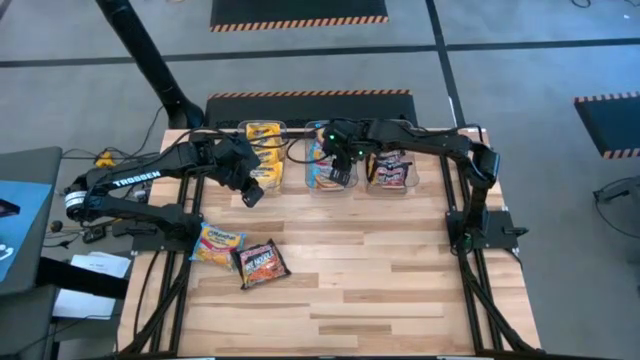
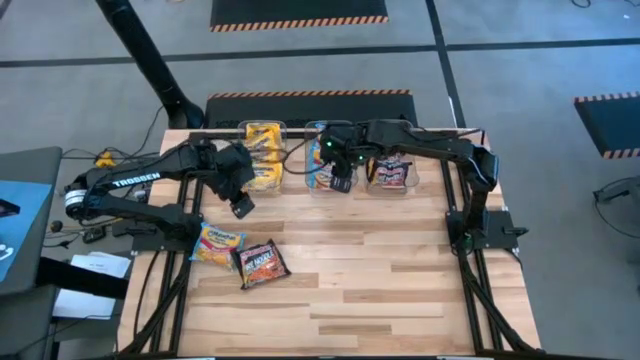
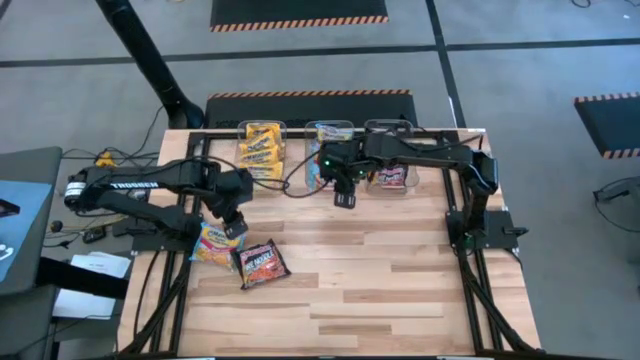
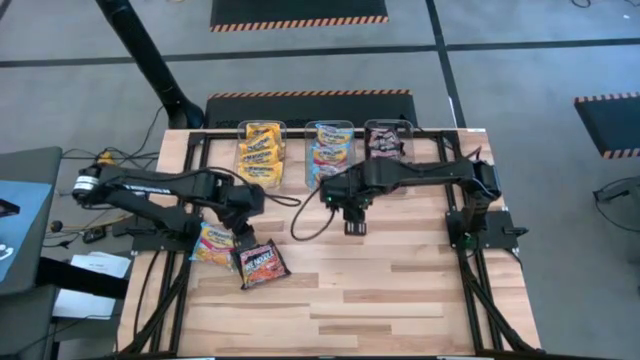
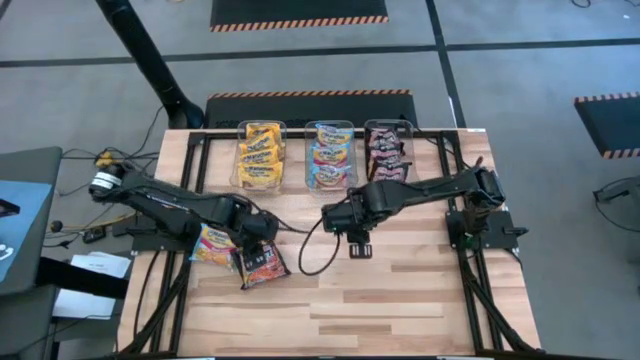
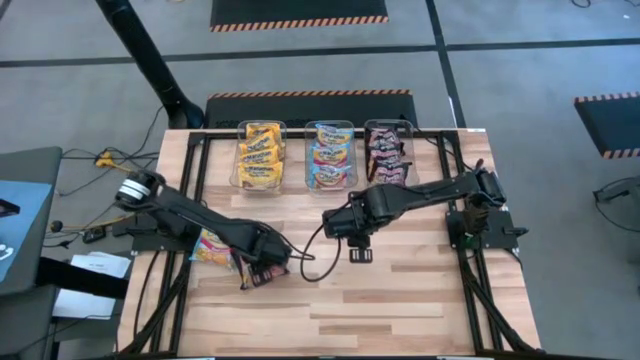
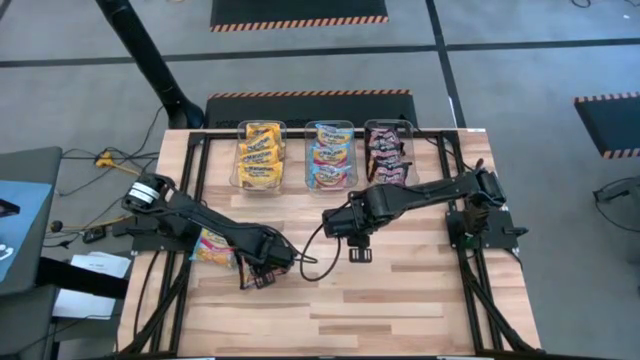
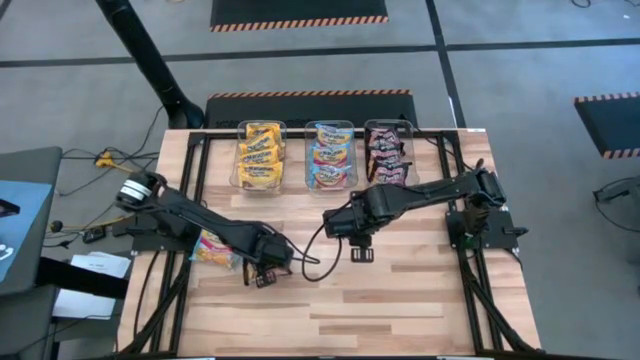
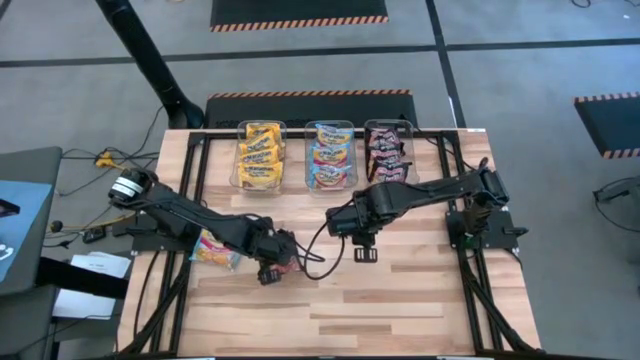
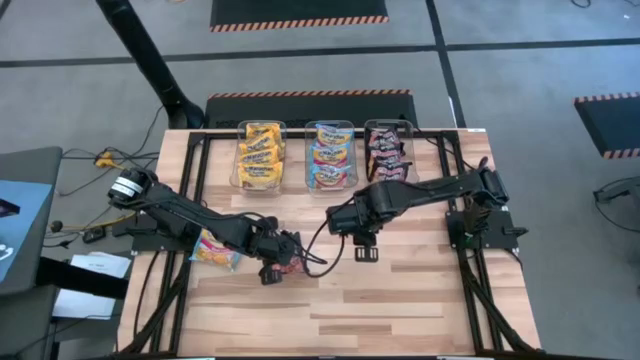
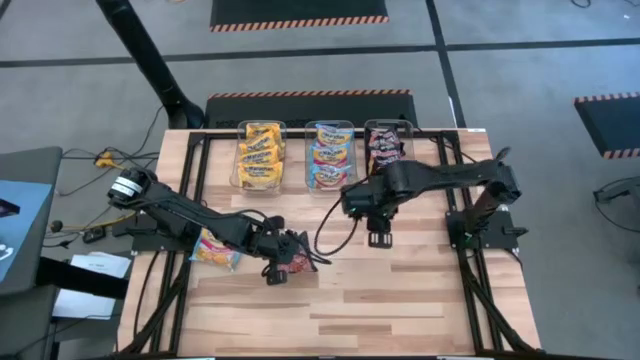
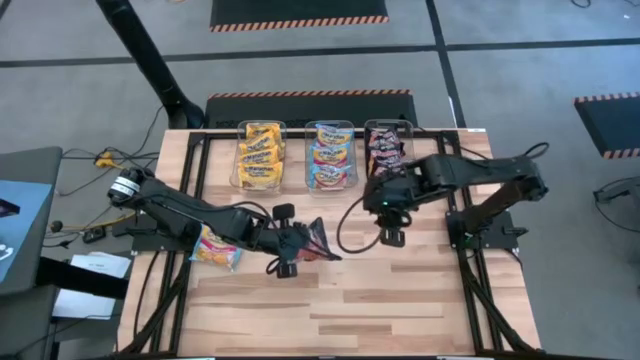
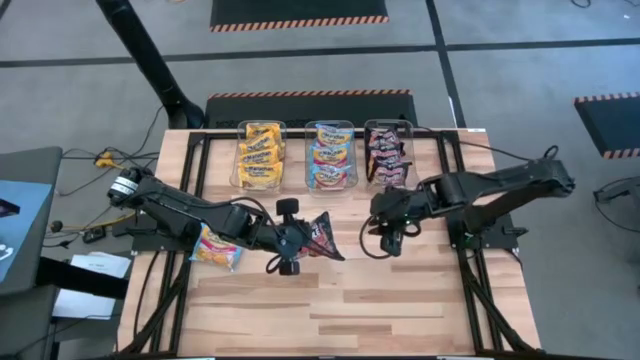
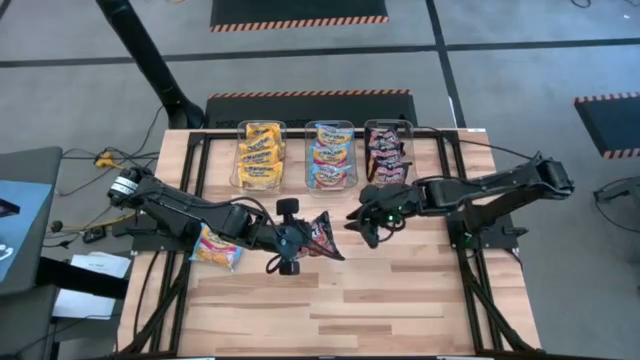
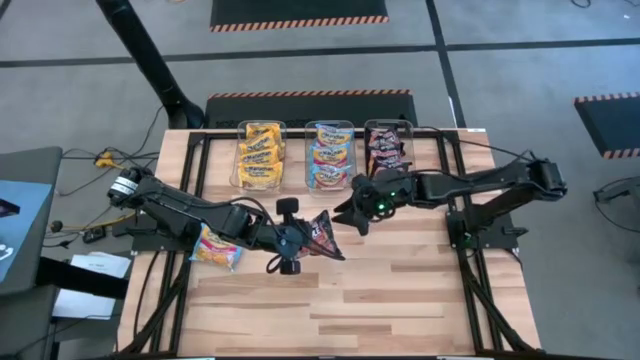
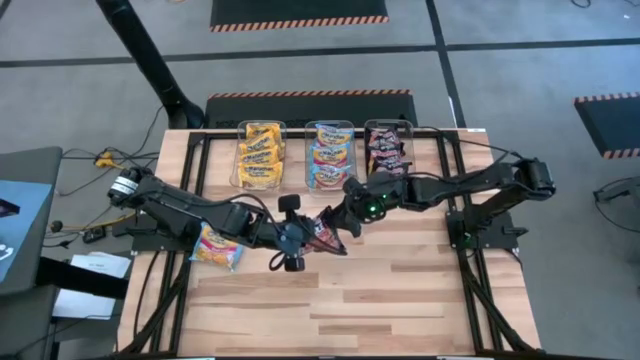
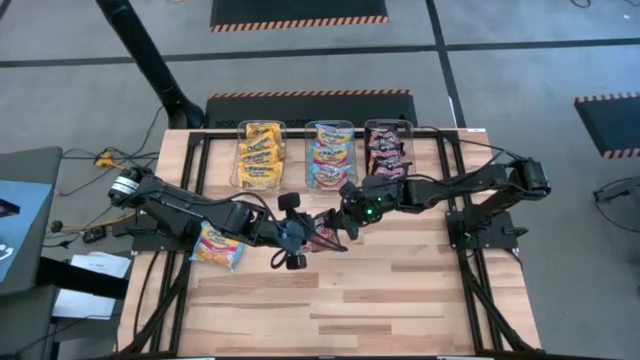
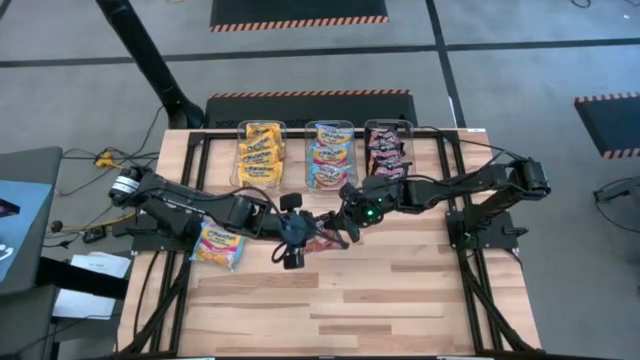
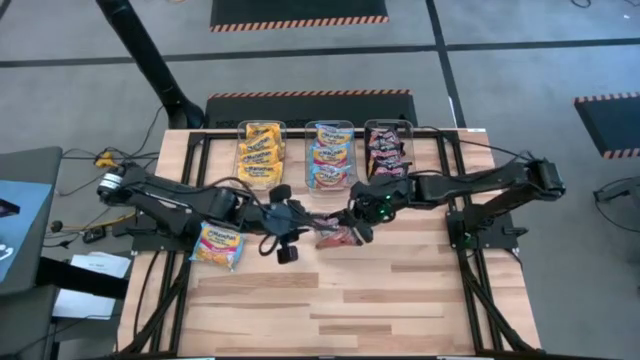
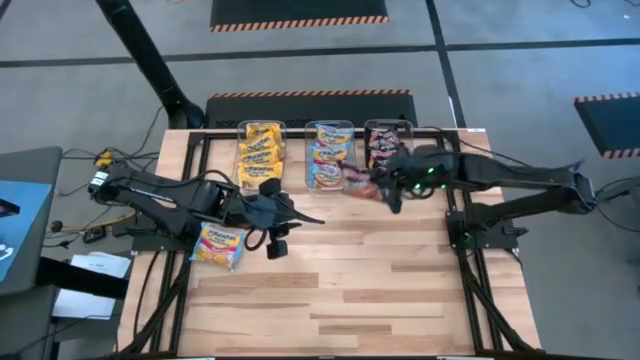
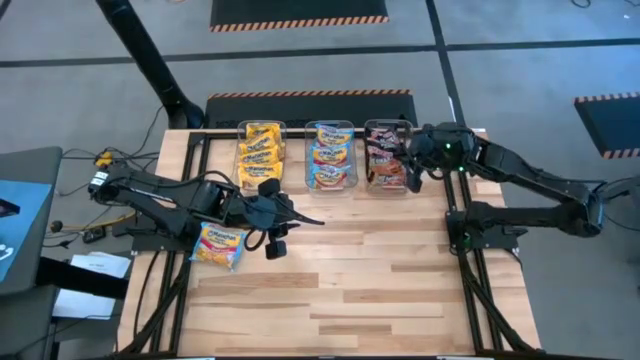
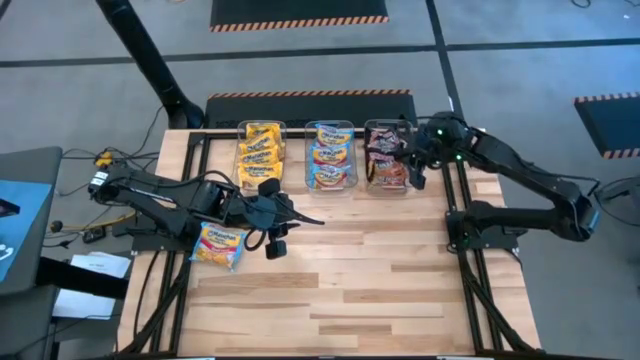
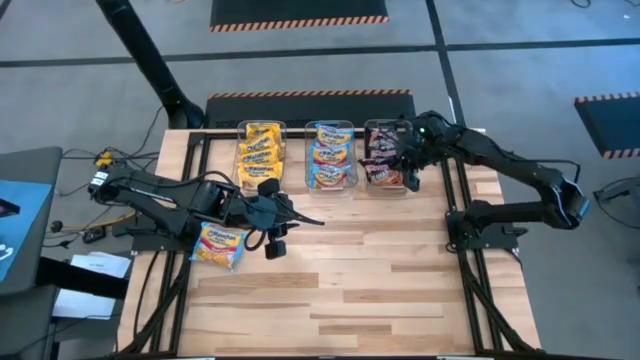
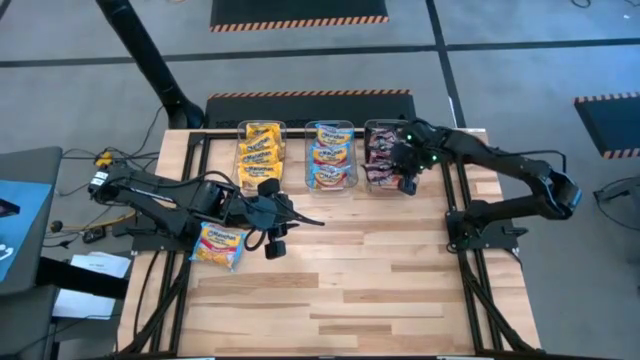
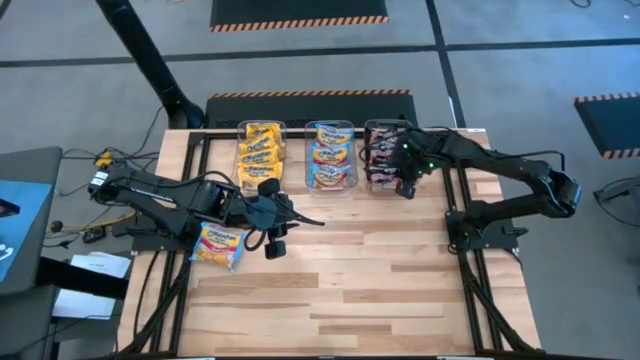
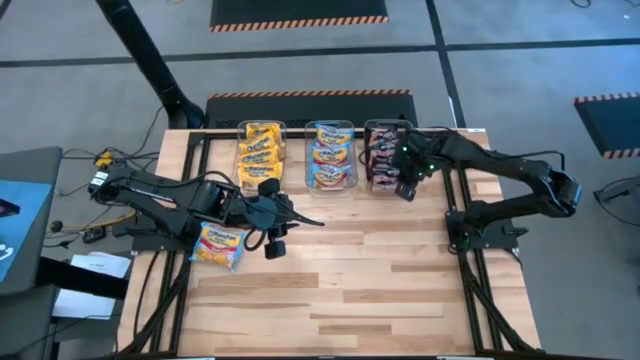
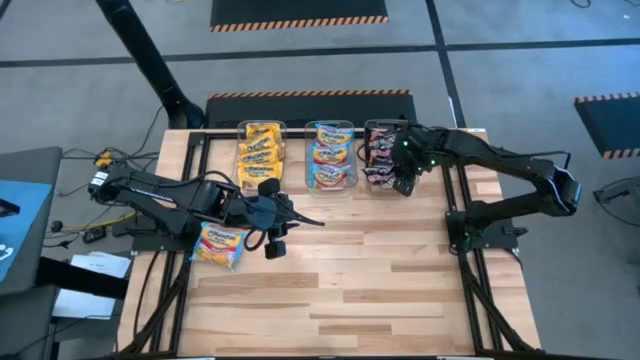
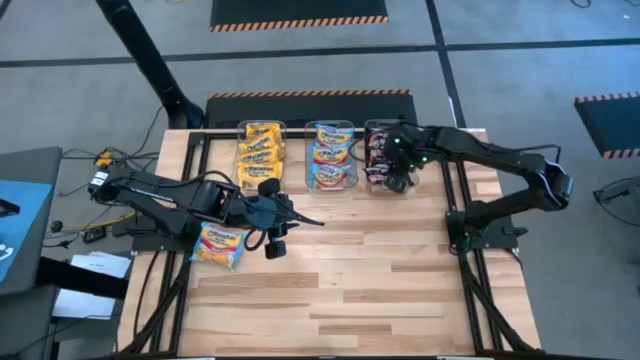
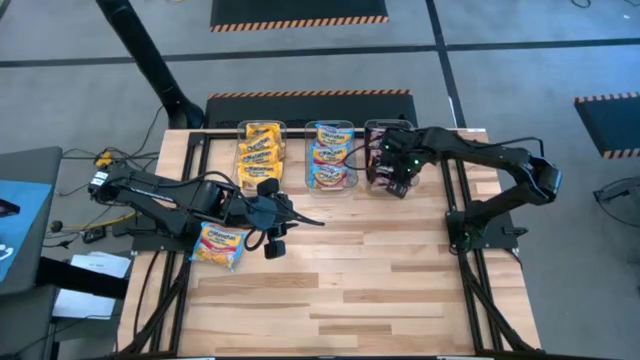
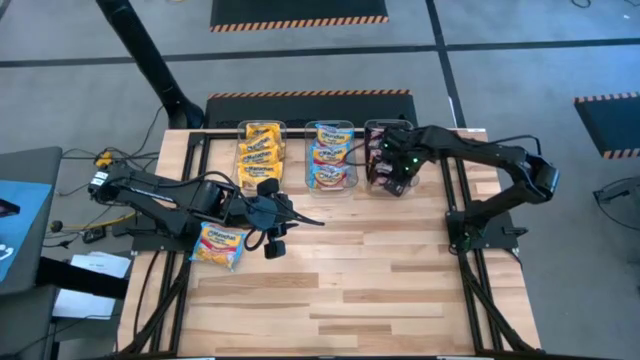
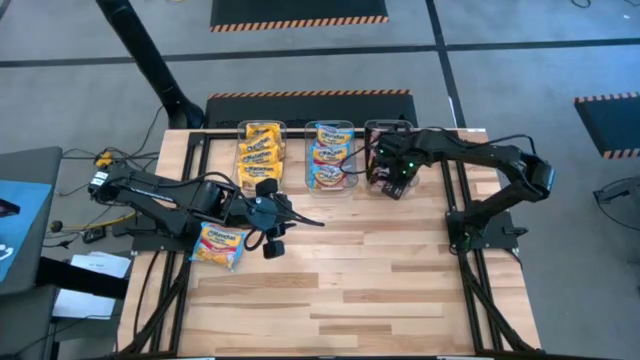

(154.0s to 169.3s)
Task: Sort Maruchan noodles
Put the black noodle pack into the right transparent bin

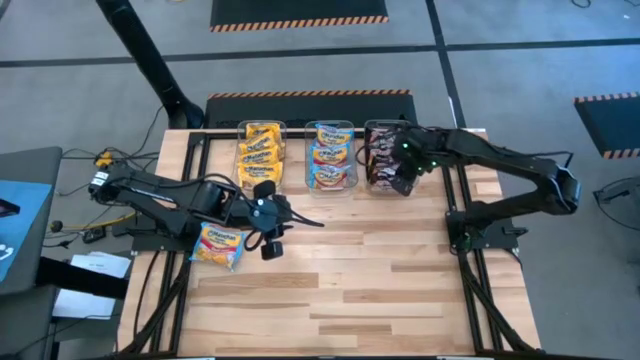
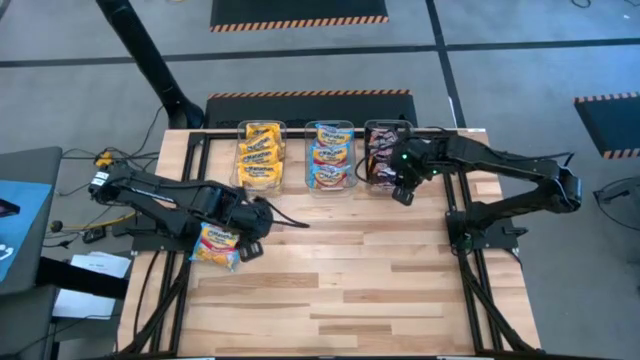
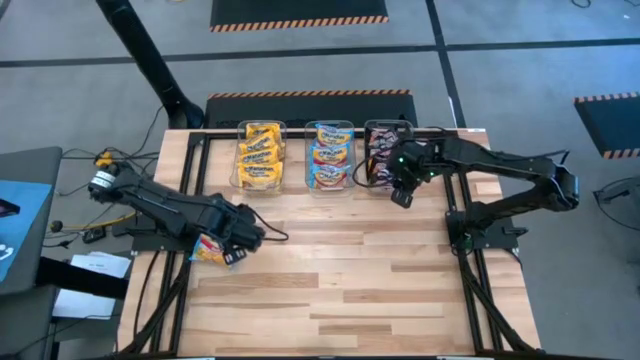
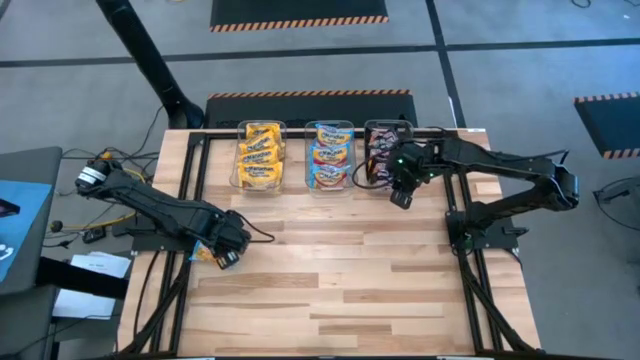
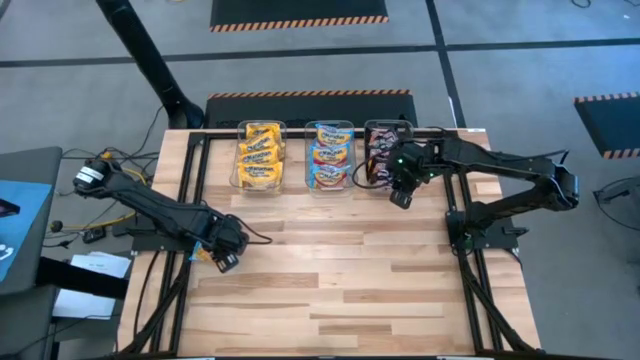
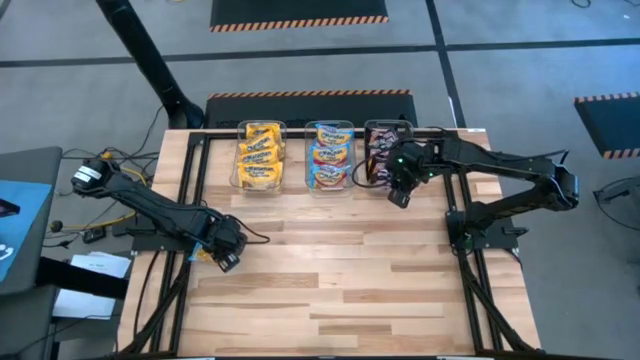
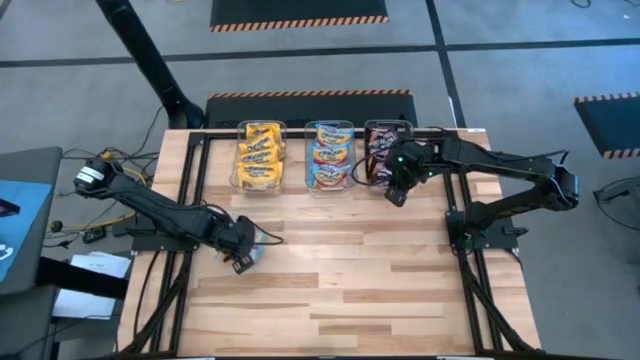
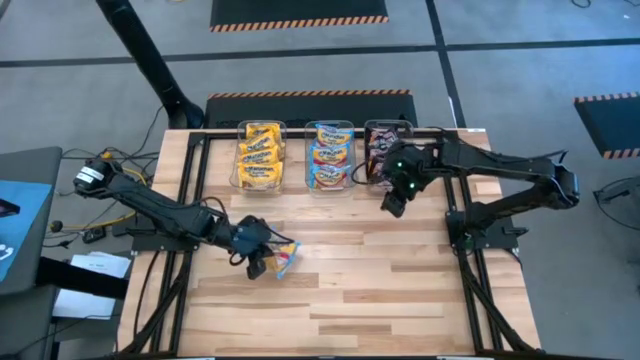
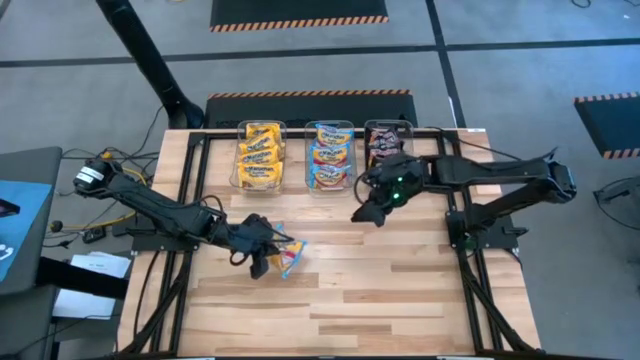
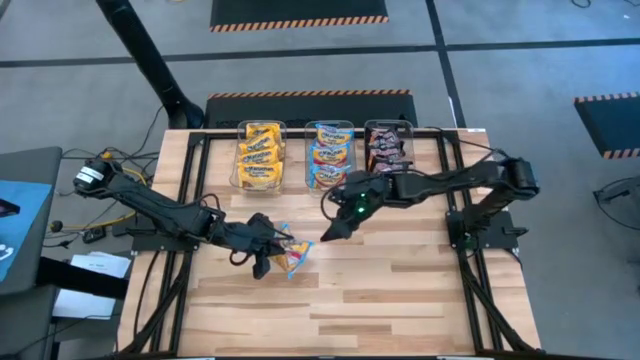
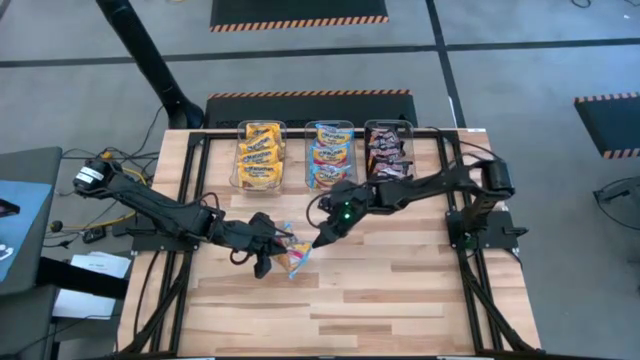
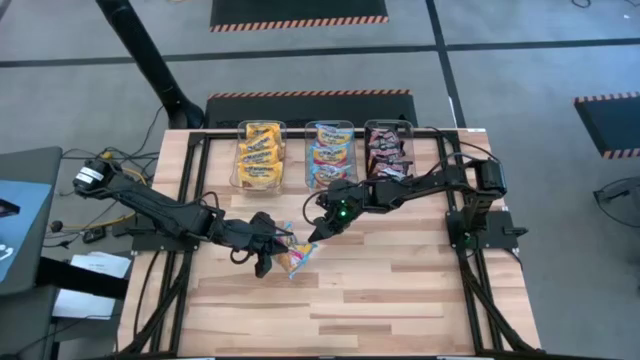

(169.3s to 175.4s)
Put the blue noodle pack into the middle transparent bin
